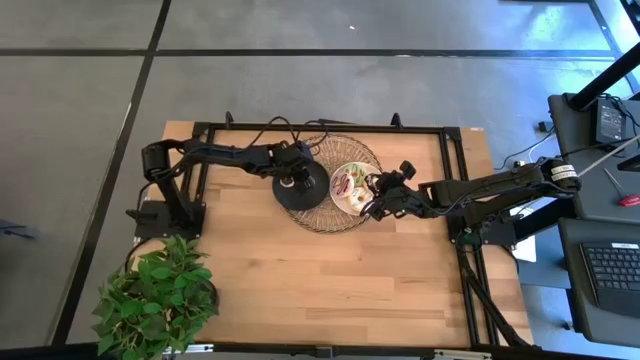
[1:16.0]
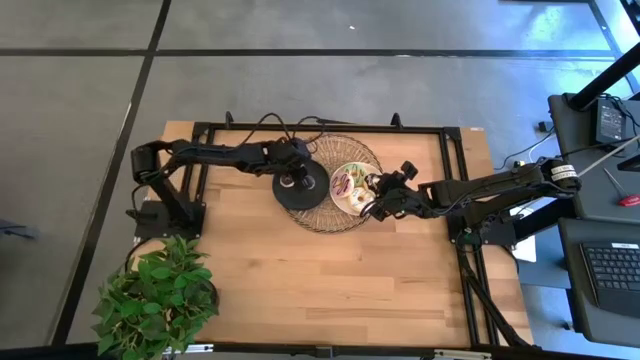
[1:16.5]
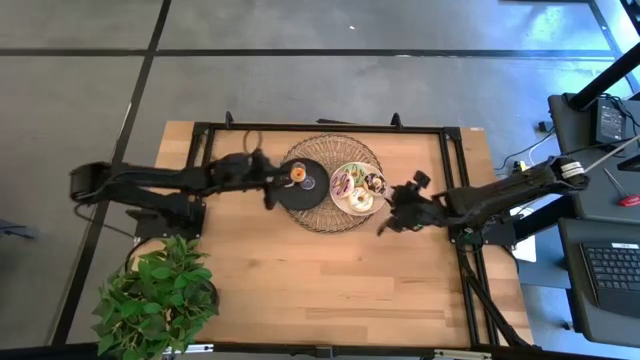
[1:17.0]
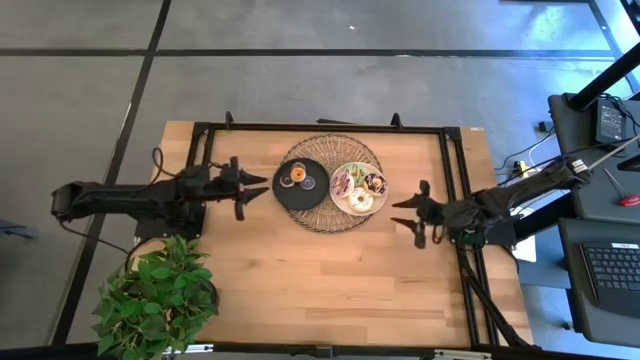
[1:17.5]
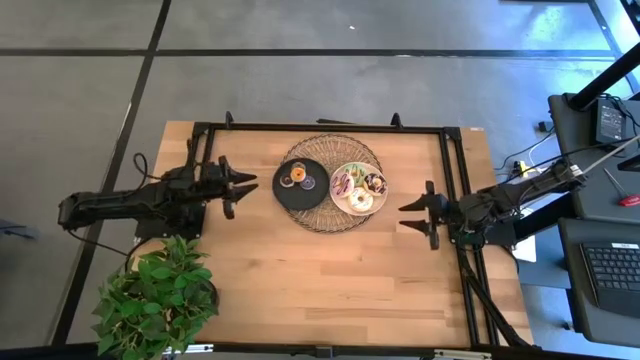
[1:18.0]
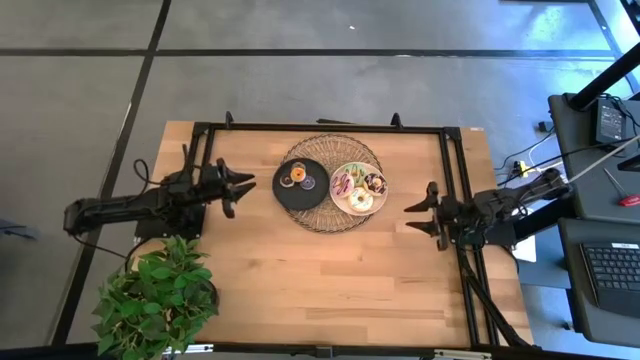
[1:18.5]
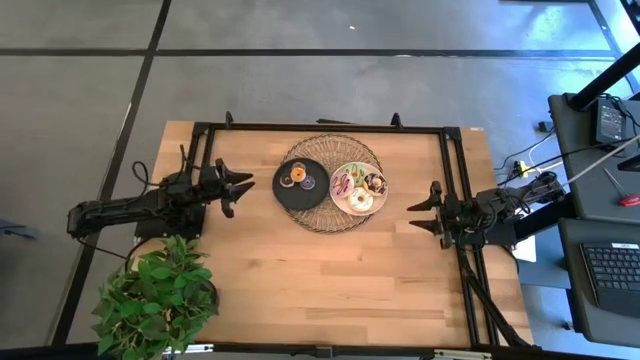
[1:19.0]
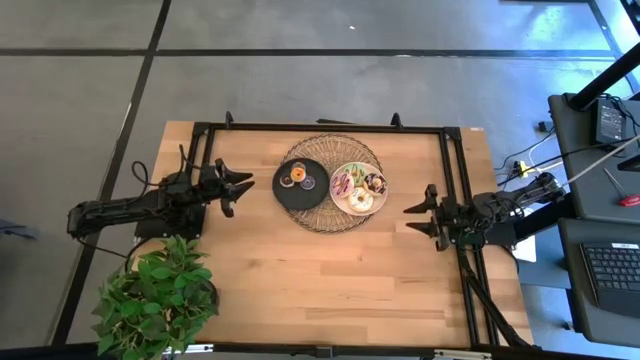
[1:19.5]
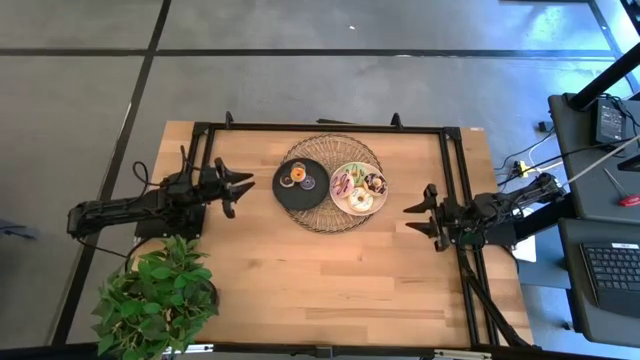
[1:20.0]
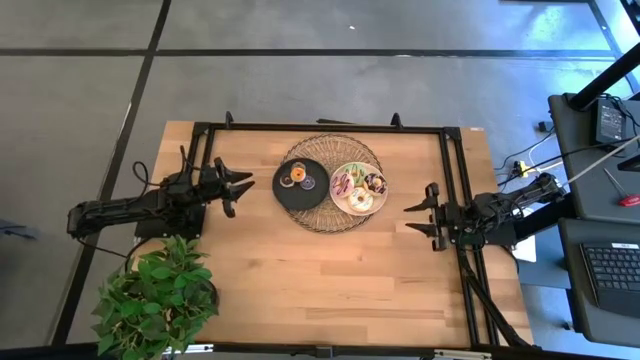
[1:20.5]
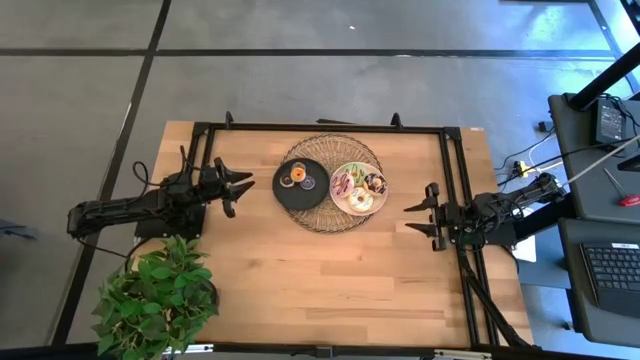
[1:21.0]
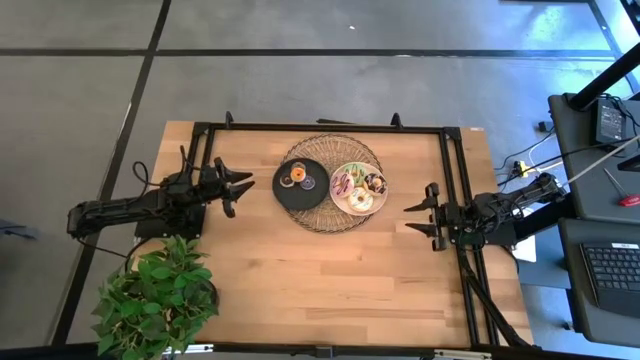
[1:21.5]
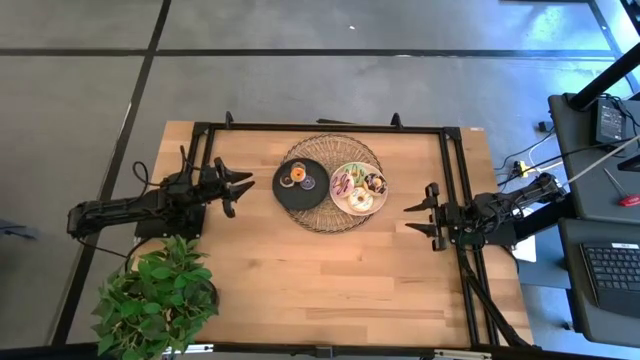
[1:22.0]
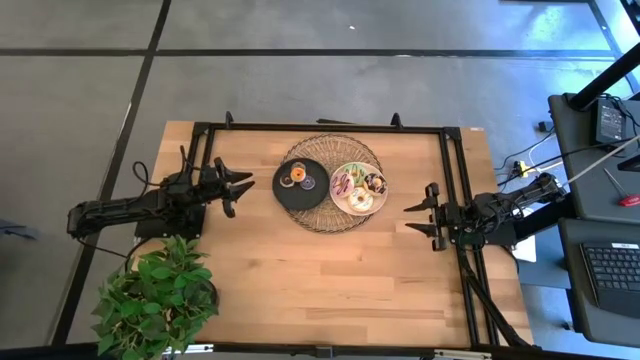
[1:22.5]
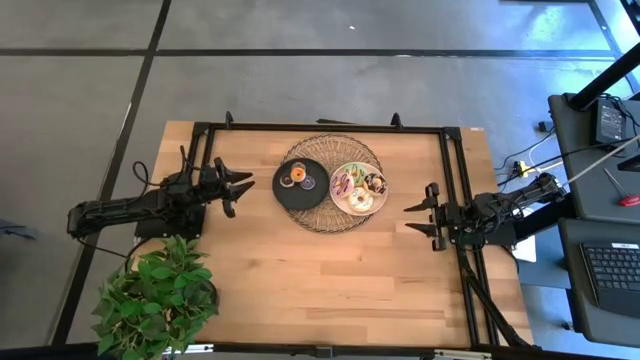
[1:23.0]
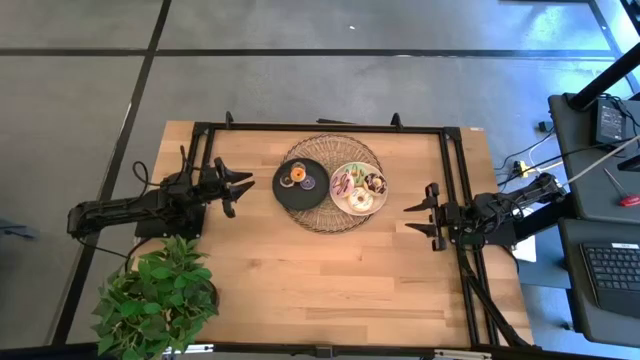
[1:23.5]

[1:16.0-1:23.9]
Task: Pick & Place donuts
Return to Home Position

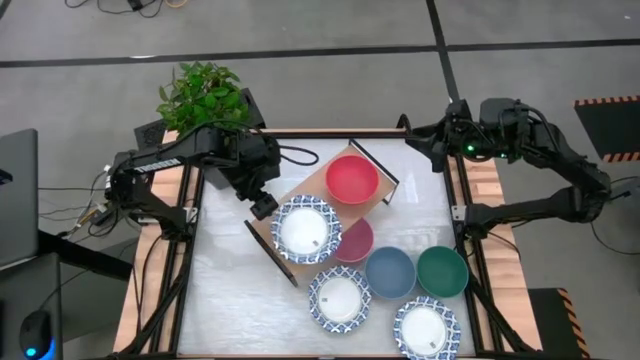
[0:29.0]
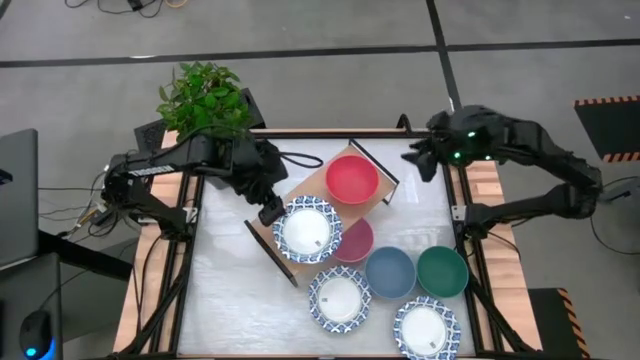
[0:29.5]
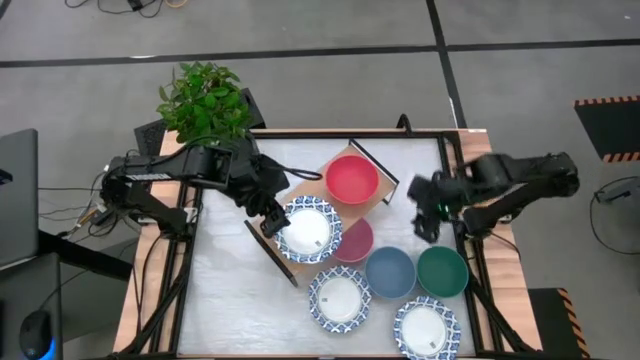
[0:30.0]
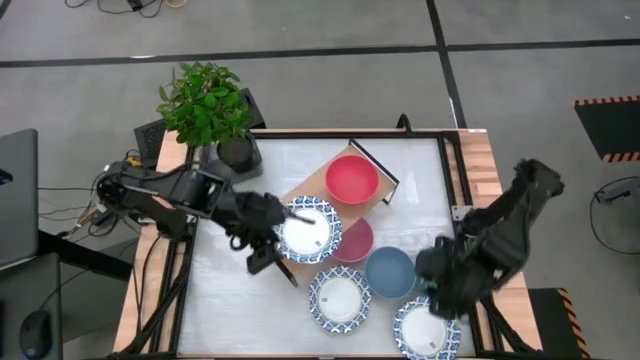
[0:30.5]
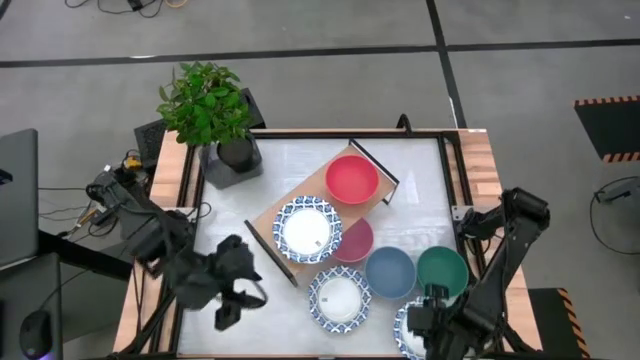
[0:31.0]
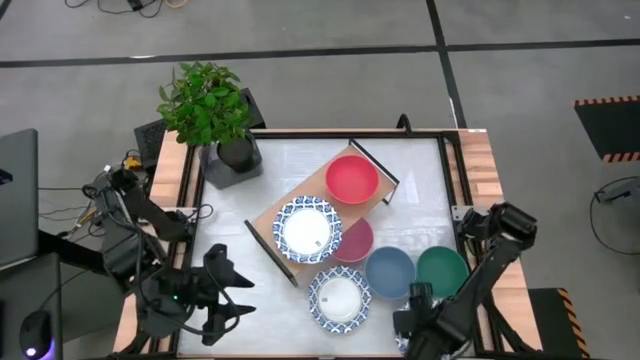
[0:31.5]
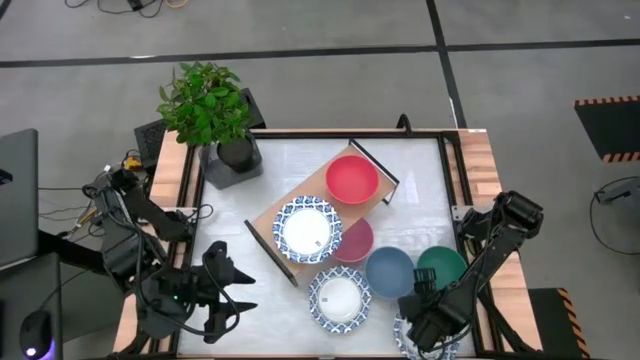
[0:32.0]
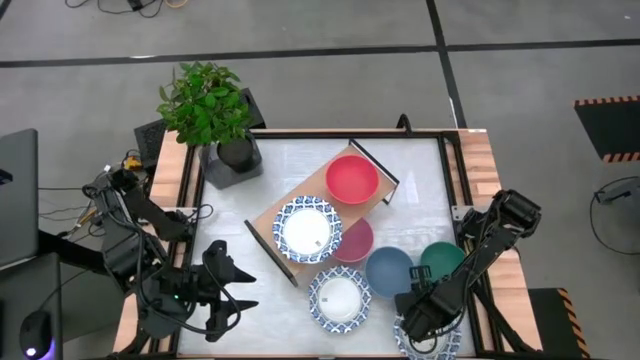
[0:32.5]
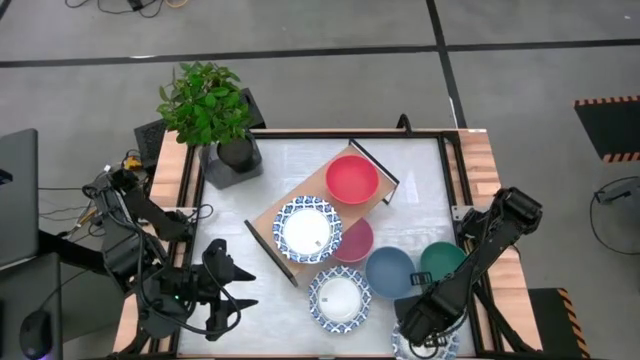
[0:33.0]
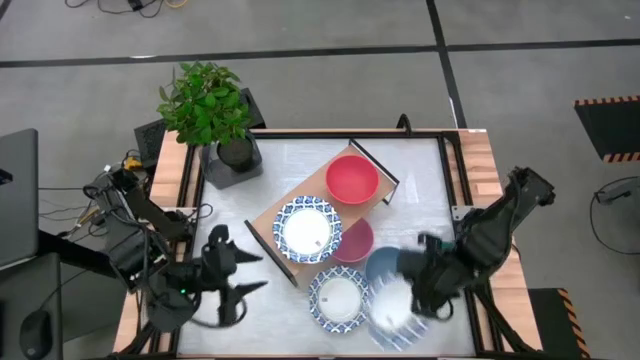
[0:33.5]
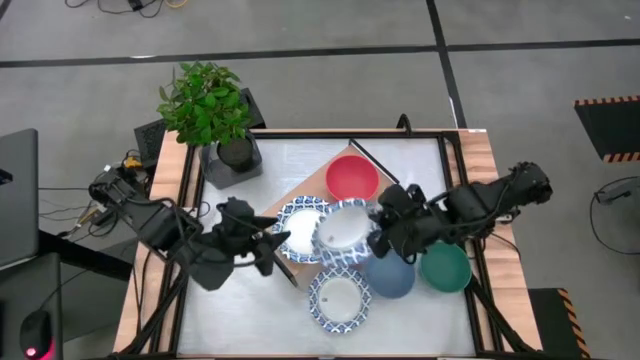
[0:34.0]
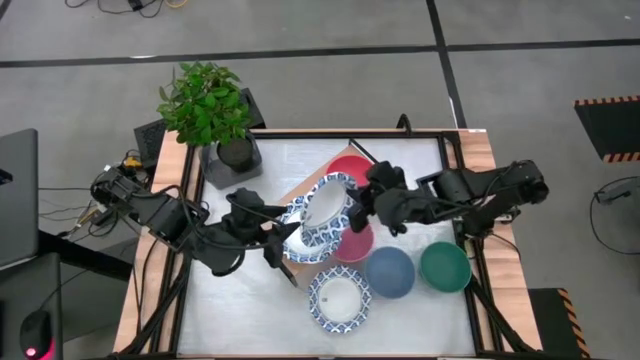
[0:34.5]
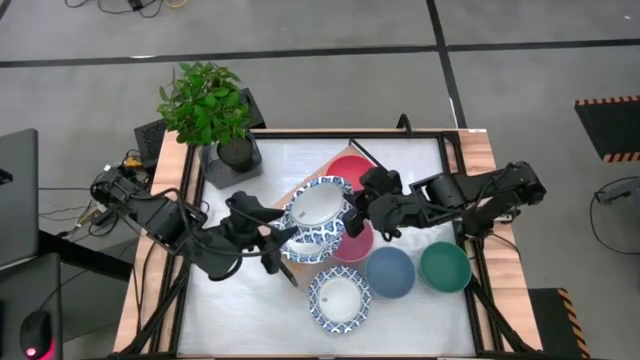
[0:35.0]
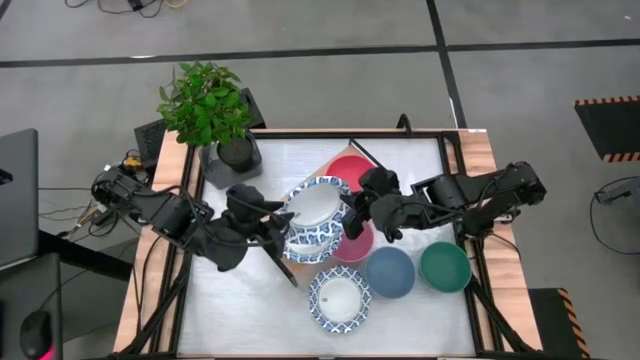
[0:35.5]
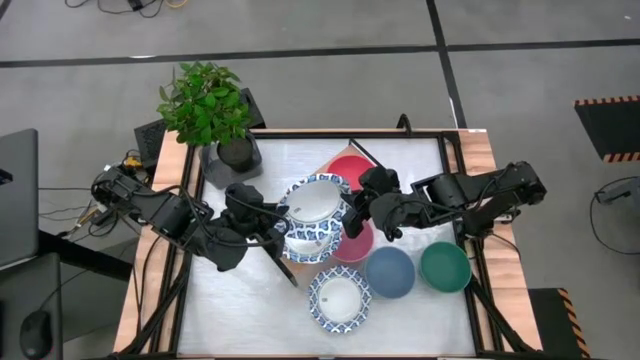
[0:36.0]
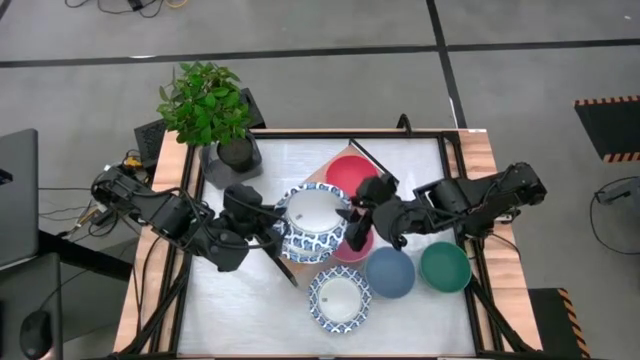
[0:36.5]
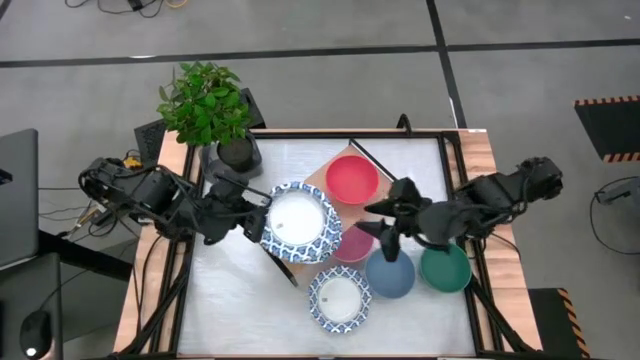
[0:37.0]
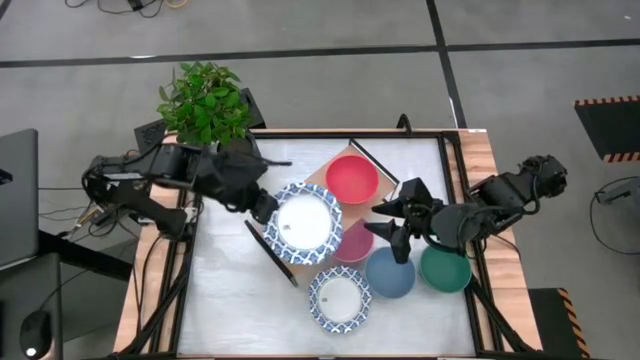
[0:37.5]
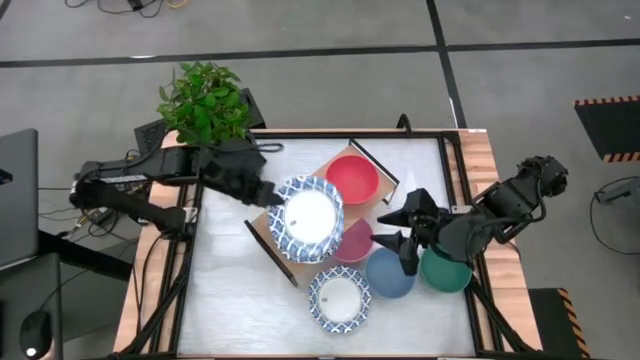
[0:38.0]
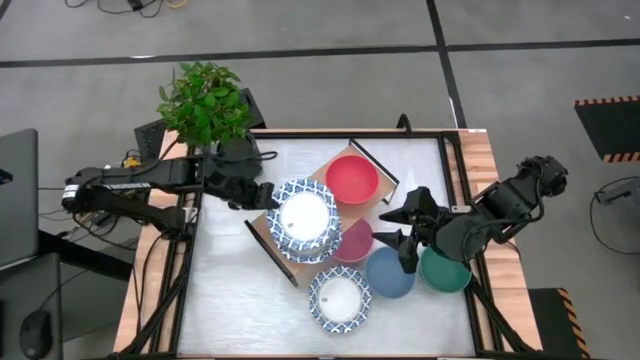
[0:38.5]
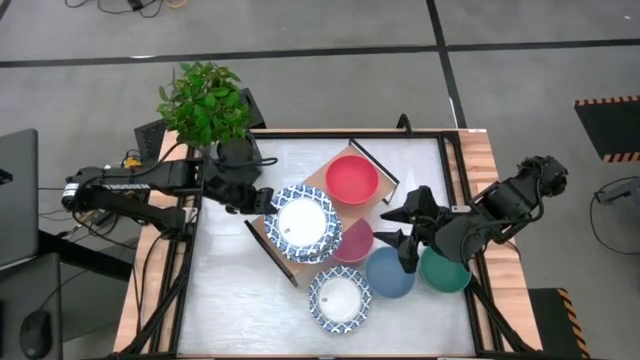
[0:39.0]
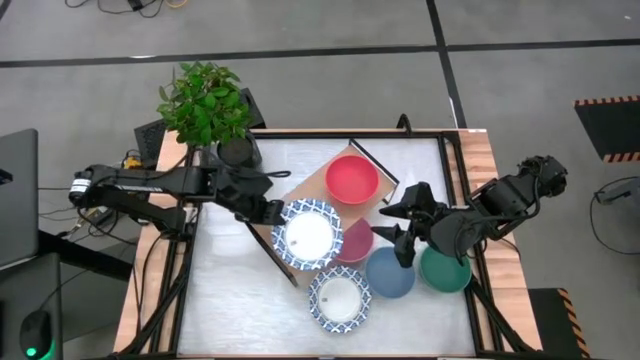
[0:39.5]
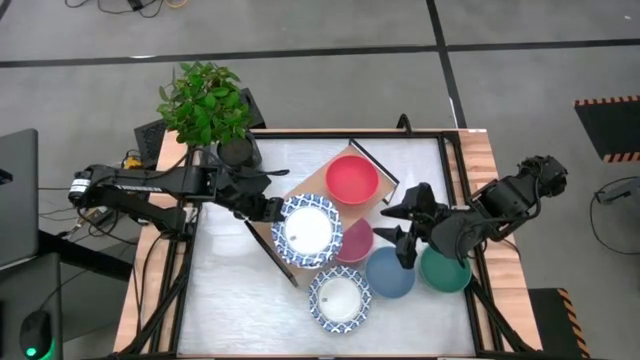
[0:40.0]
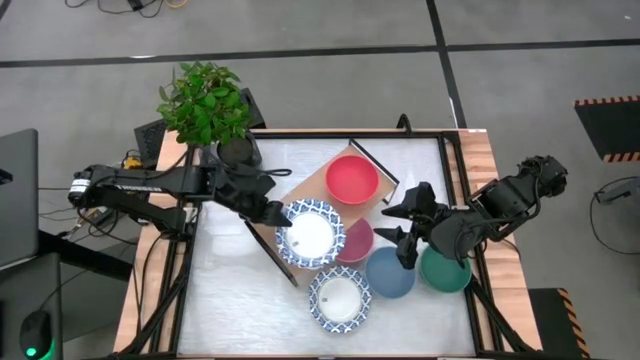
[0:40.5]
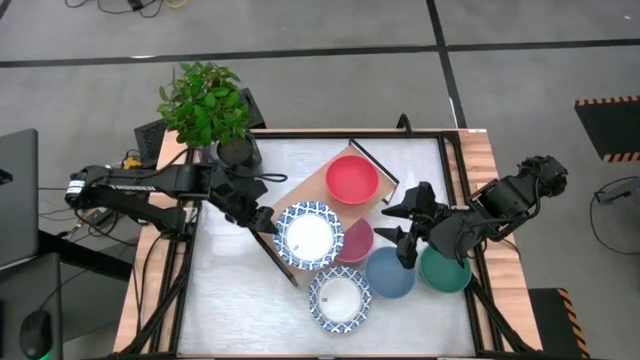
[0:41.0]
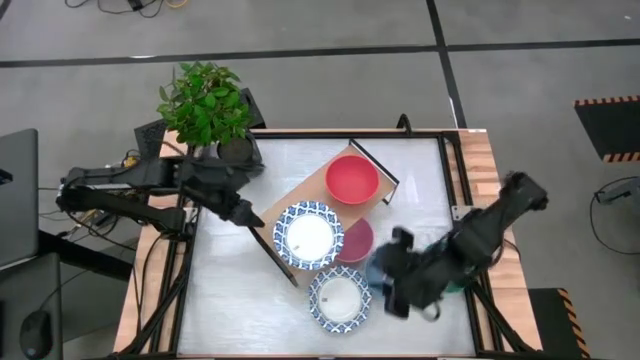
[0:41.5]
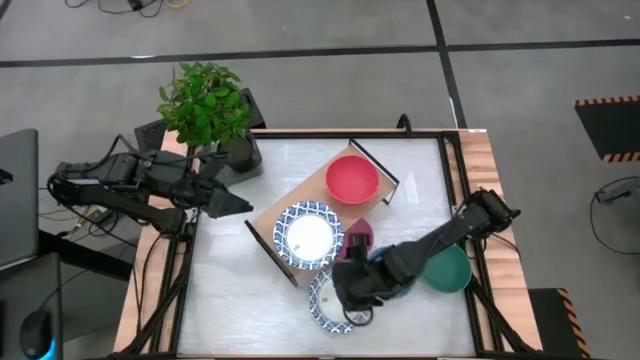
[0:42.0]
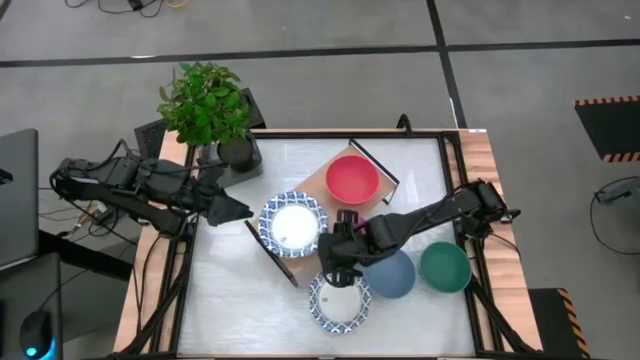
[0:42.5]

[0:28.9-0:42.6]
Task: Place and stack bowls onto a shelf
Stack the white patterned bowl on top of the white patterned bowl on the shelf
